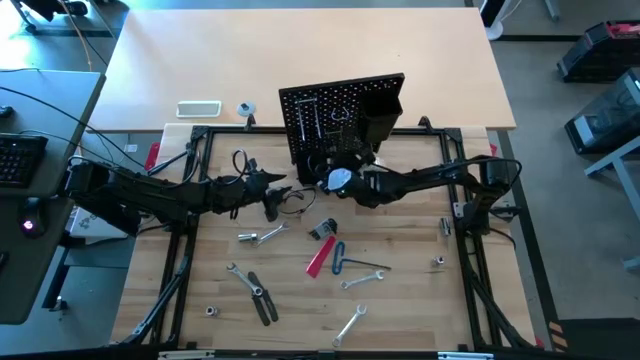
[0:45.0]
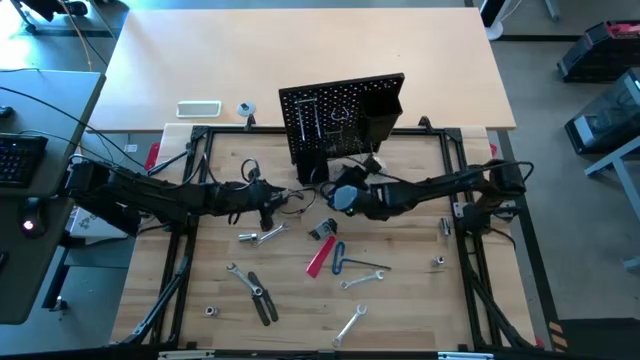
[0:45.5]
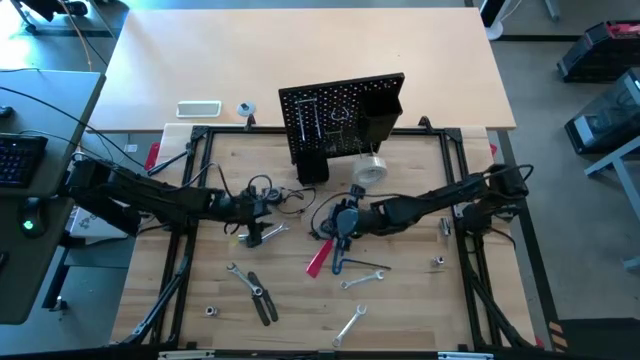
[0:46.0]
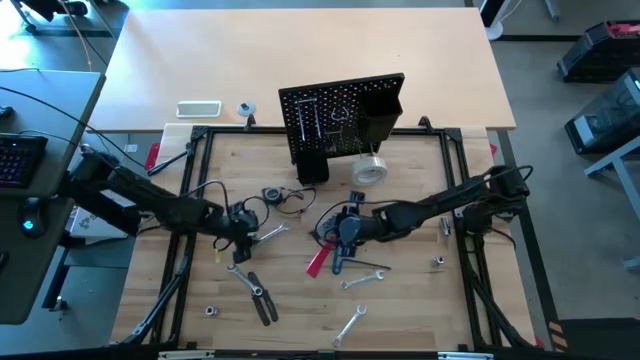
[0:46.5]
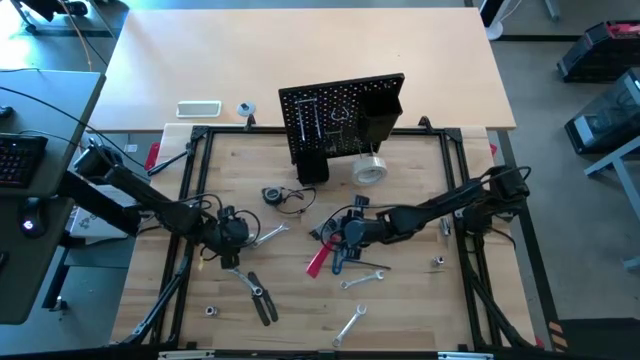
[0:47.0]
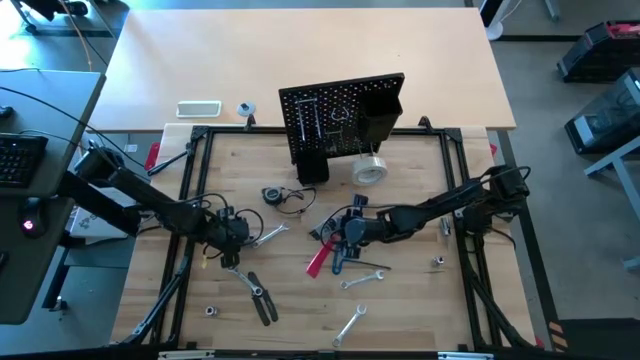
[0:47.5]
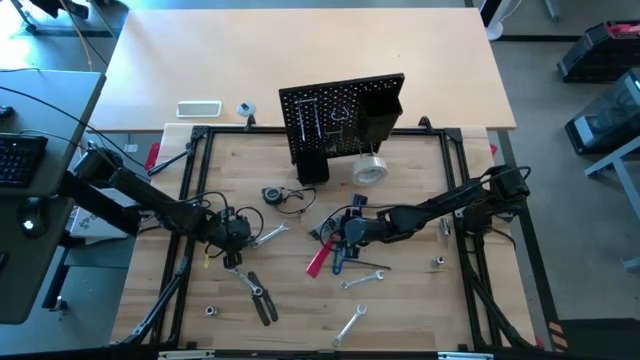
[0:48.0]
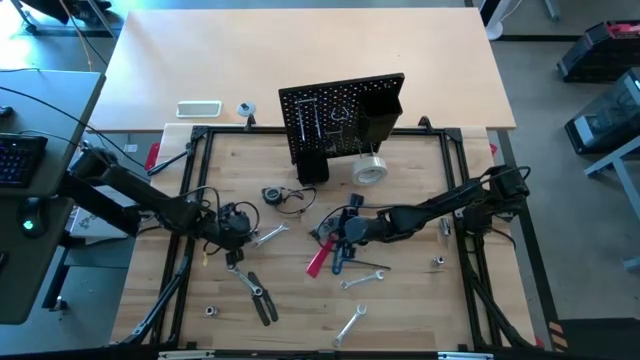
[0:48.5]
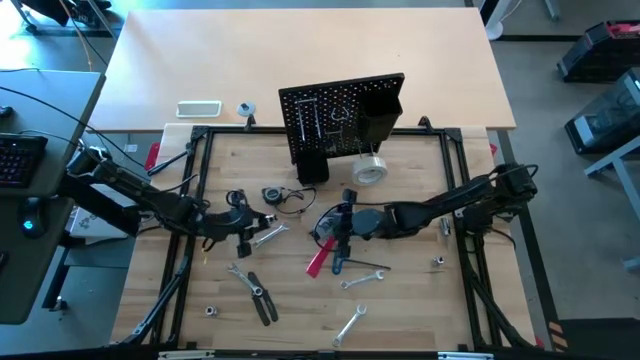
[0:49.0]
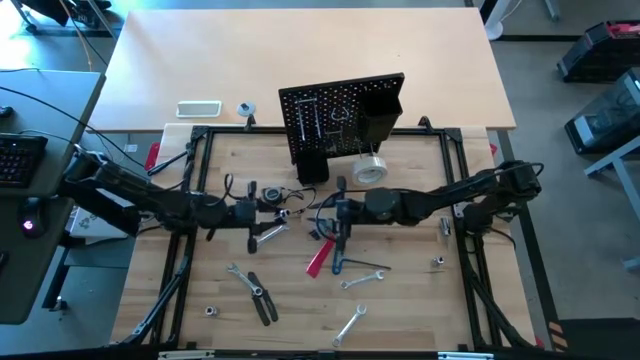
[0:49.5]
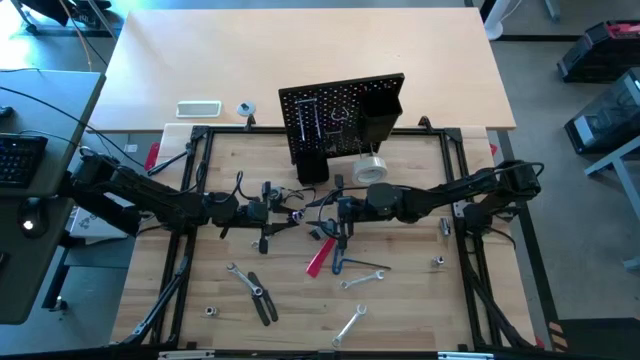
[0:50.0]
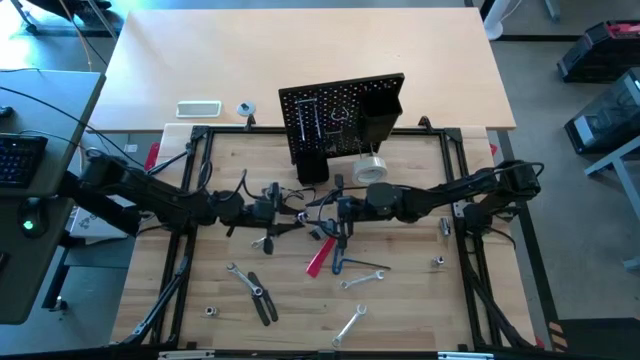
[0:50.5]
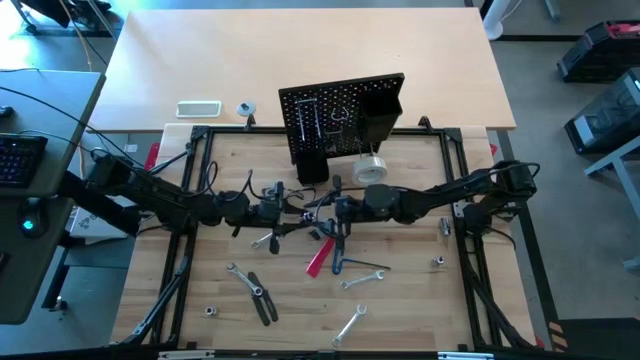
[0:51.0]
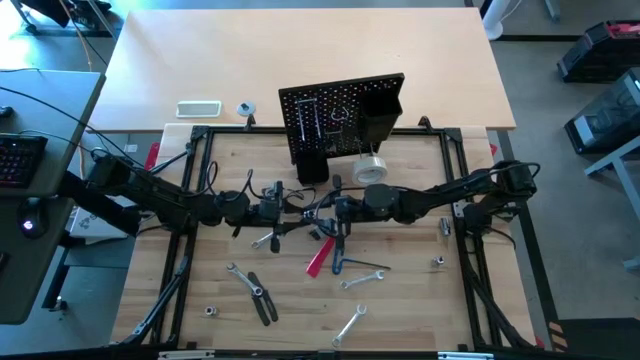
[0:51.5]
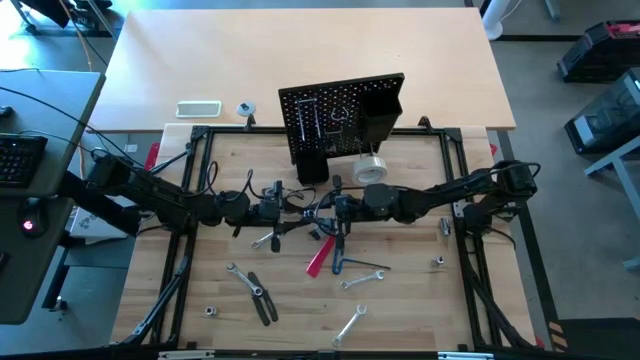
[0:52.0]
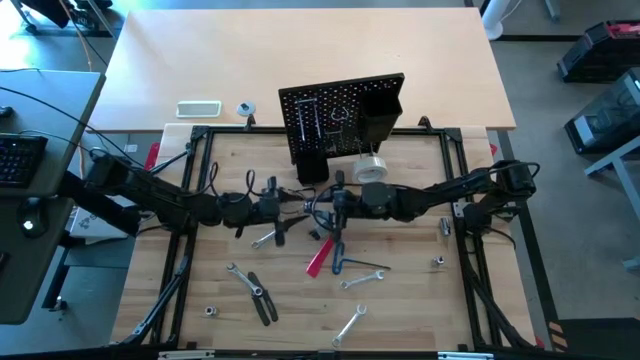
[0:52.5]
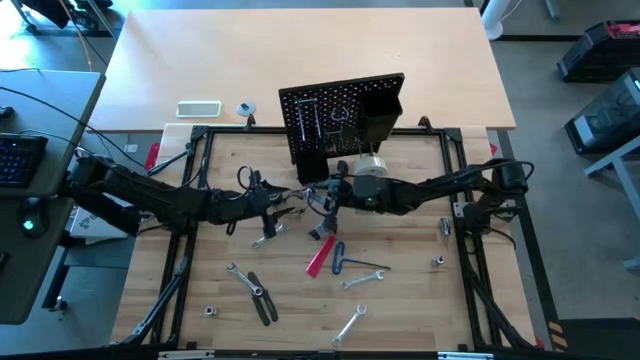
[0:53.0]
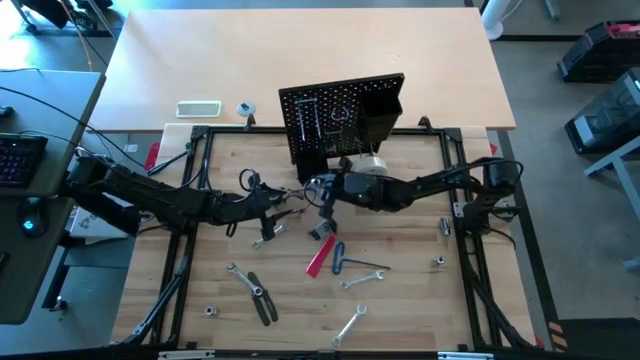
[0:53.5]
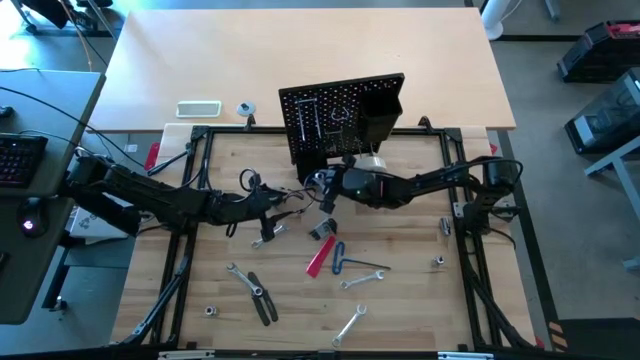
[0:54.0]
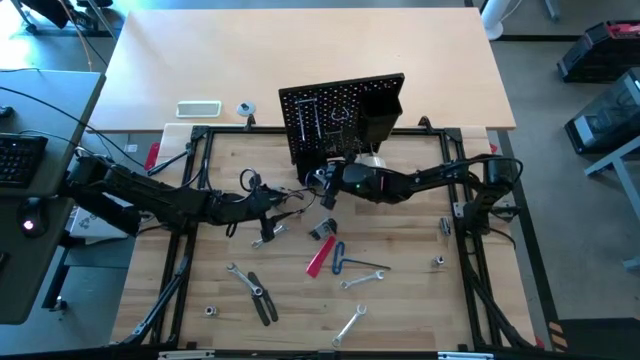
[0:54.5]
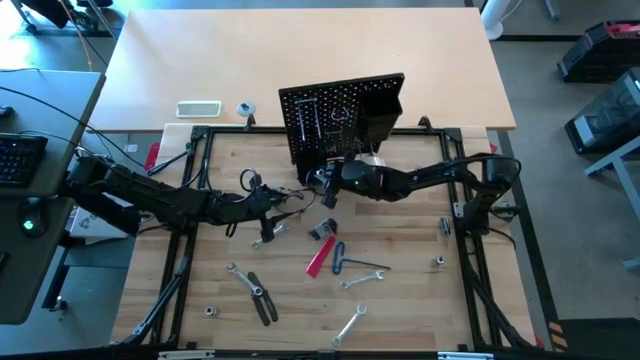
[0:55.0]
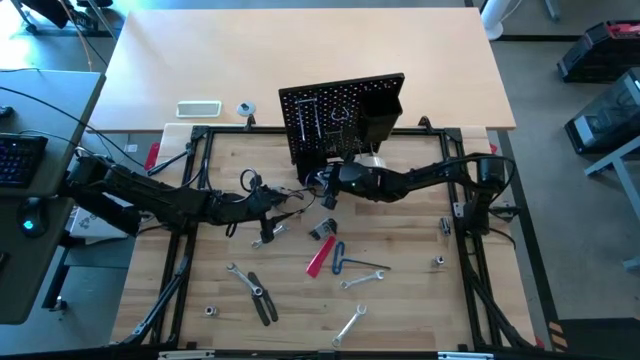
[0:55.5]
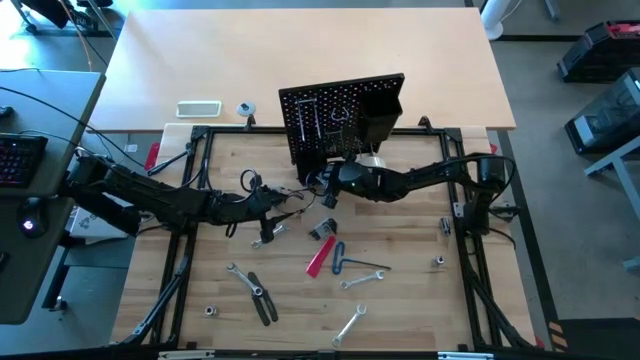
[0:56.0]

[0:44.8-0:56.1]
Task: Hang tools onto peg board
Put the top left socket into the bottom black bin on the peg board

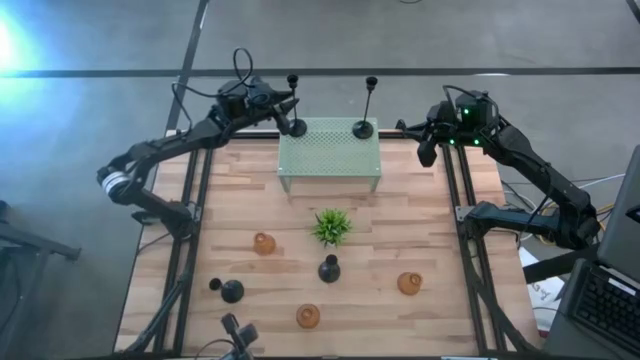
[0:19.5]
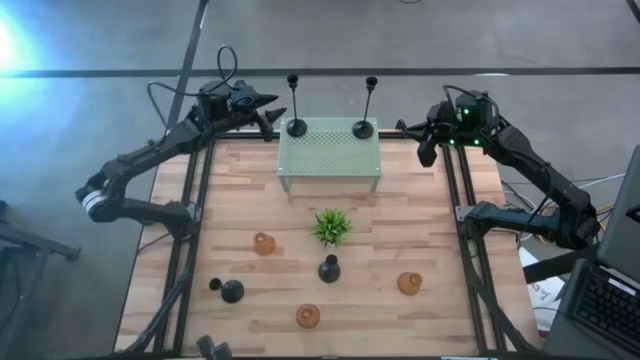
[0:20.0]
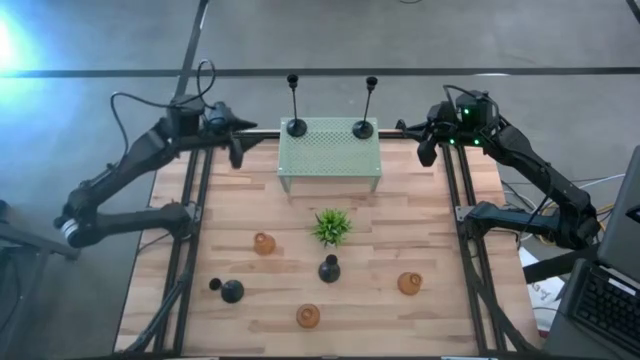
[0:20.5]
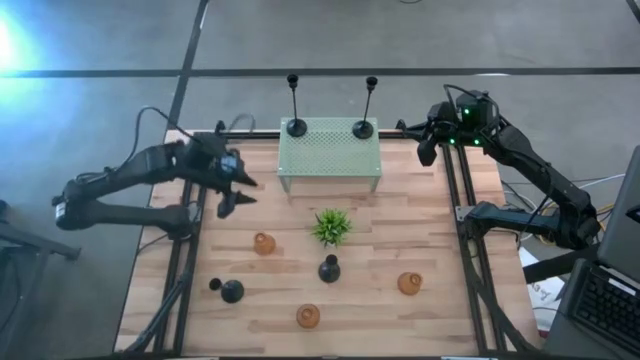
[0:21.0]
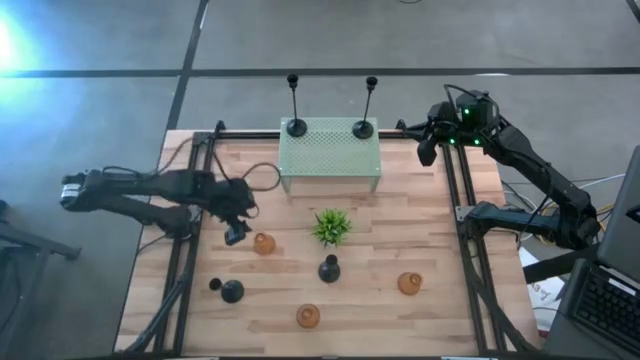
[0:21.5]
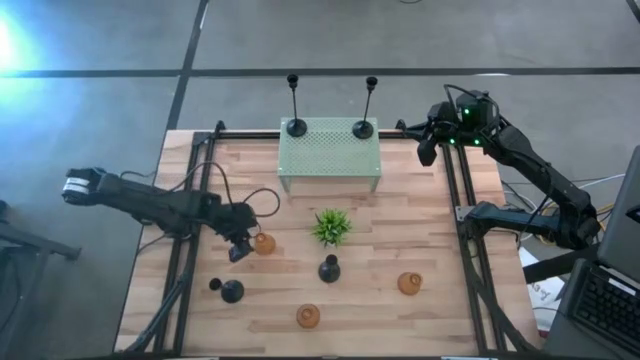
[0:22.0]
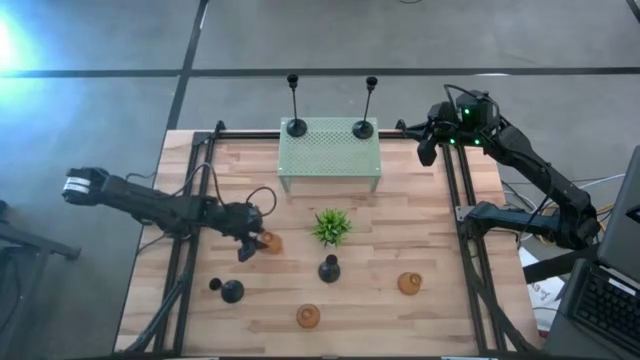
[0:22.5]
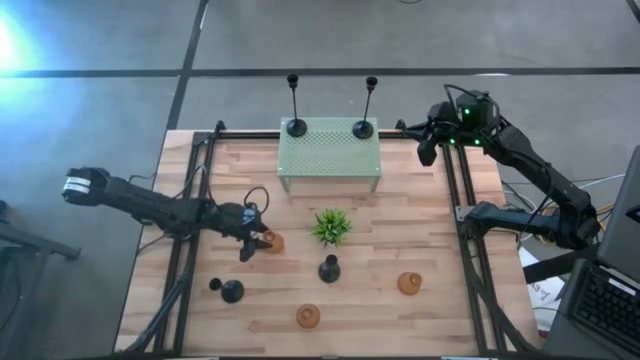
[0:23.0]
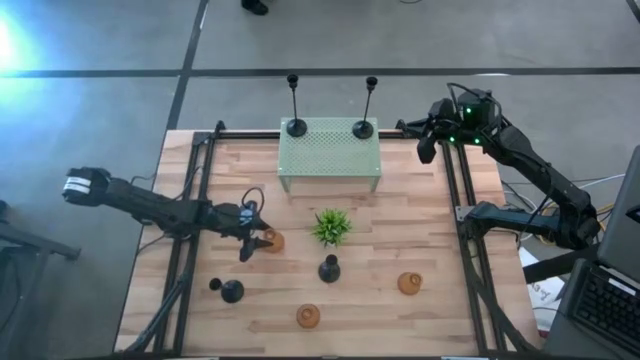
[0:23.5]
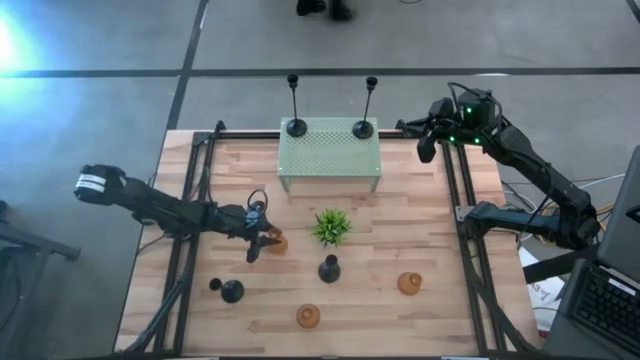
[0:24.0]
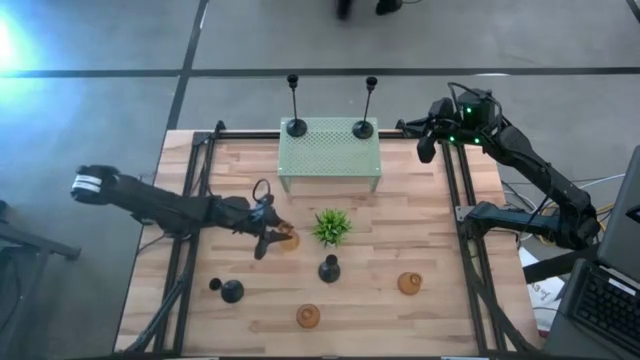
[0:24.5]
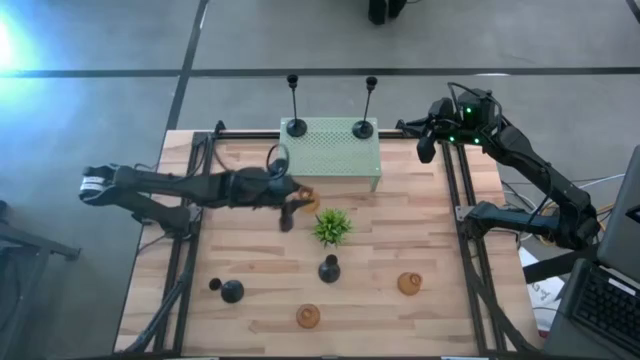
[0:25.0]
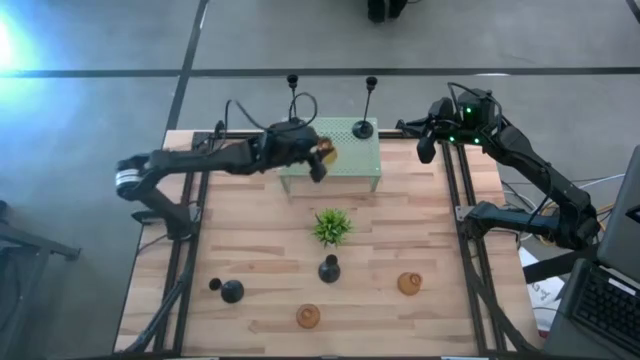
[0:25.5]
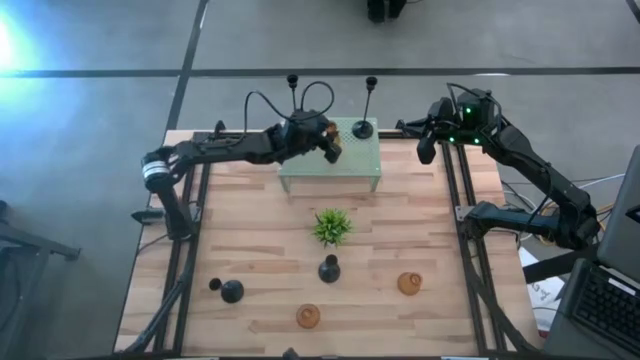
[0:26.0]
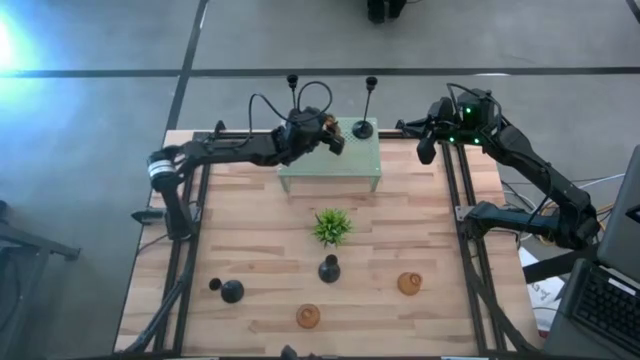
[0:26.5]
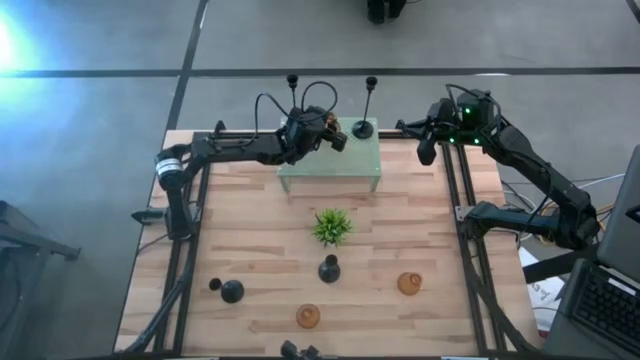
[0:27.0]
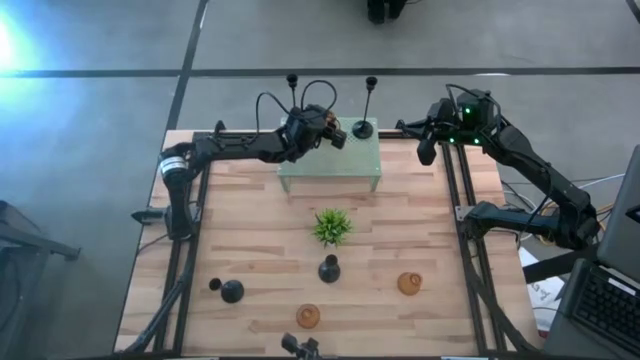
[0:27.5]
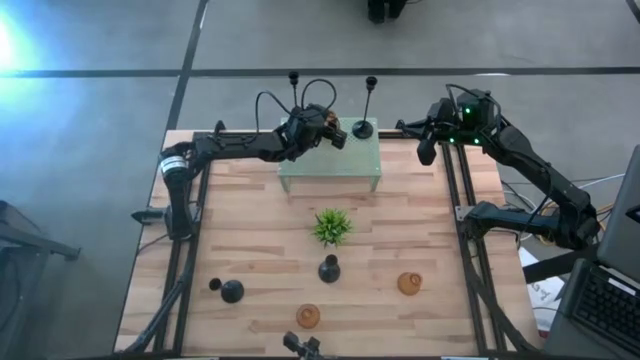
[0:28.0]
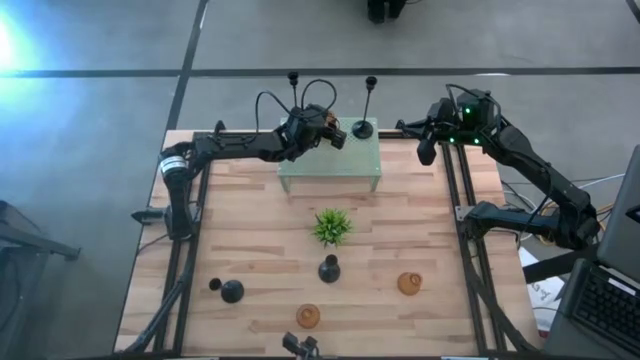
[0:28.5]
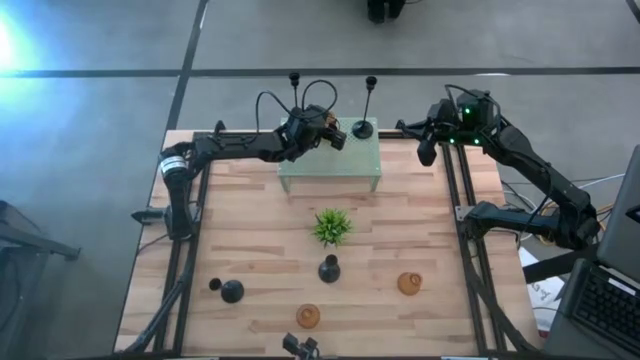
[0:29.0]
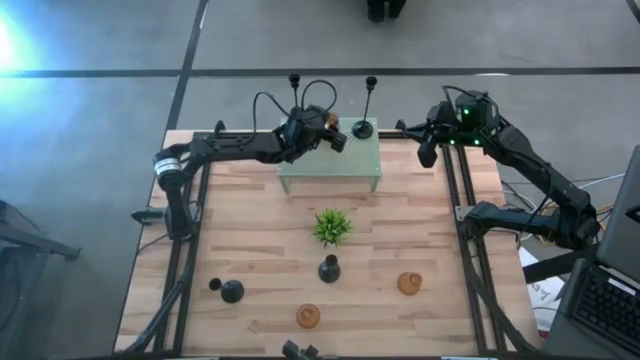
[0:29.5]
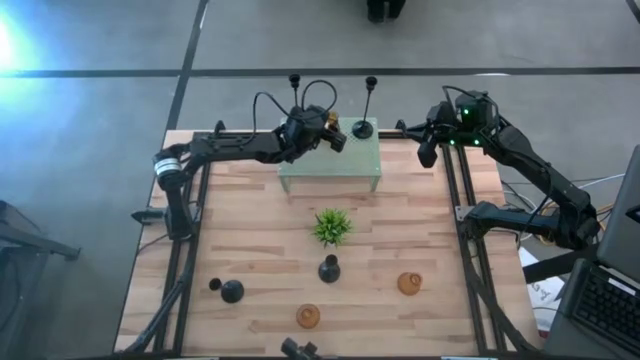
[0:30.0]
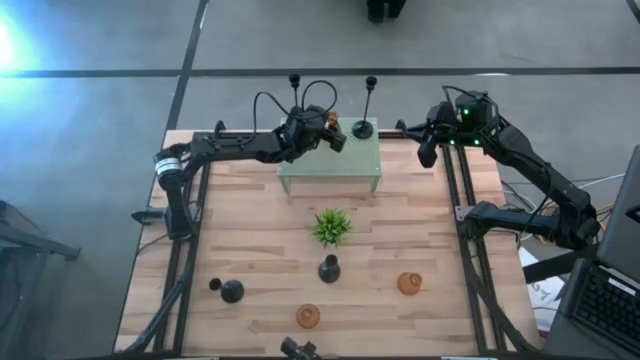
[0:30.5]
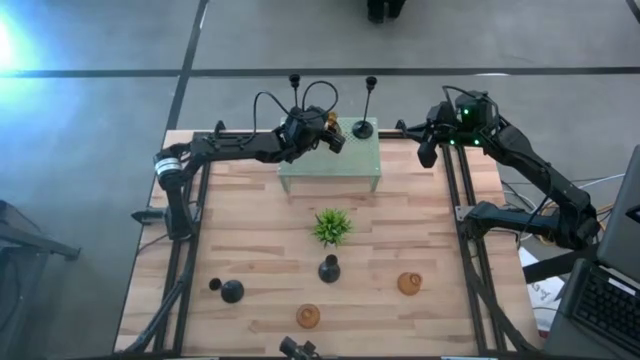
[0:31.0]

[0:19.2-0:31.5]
Task: Pick & Place candle stick holders
Put the orange candle holder on the shelf
